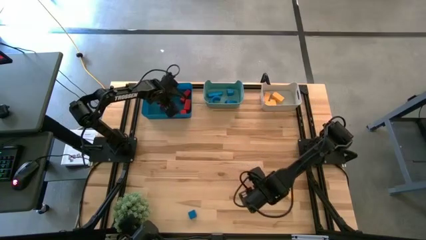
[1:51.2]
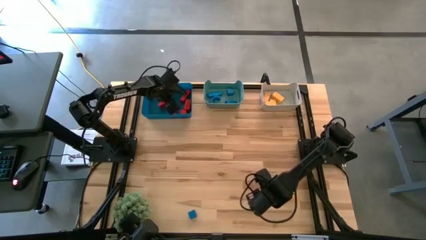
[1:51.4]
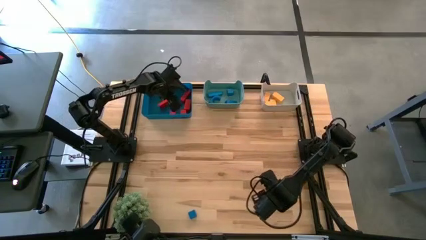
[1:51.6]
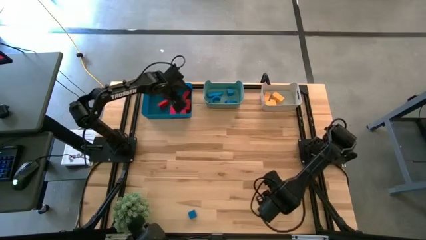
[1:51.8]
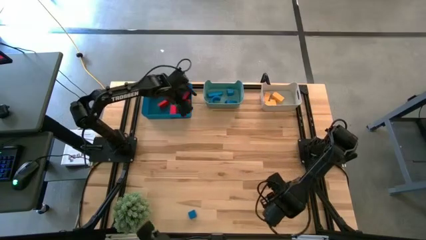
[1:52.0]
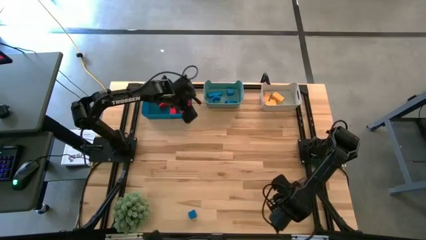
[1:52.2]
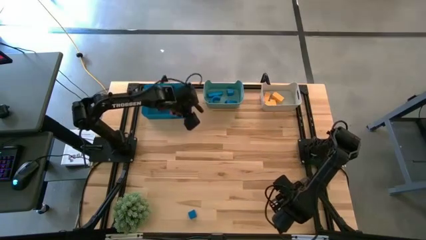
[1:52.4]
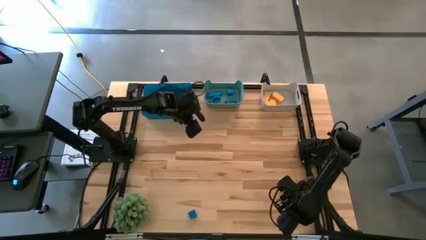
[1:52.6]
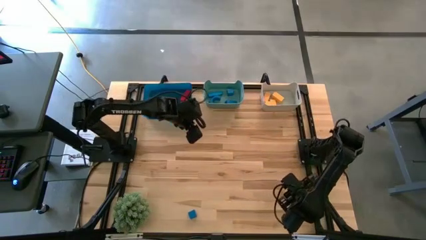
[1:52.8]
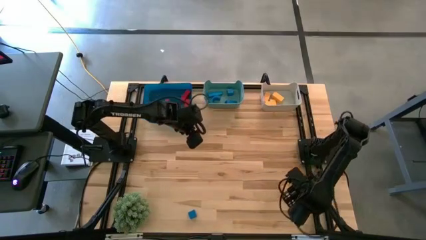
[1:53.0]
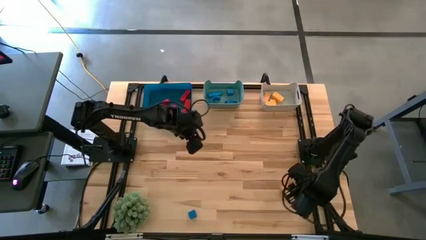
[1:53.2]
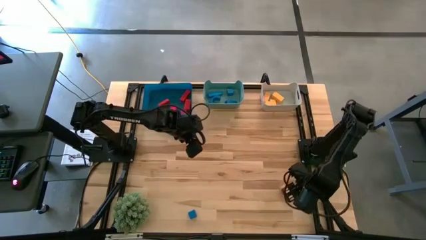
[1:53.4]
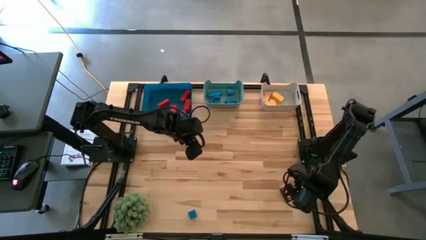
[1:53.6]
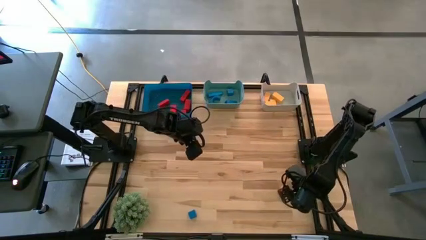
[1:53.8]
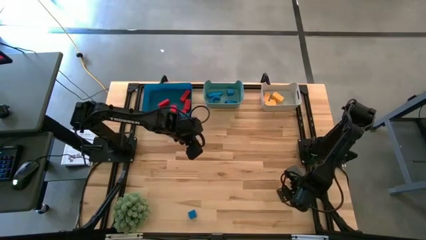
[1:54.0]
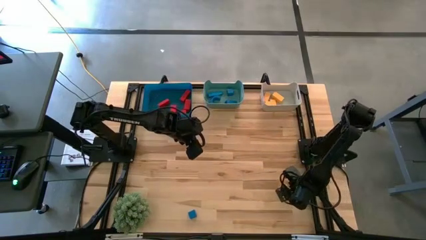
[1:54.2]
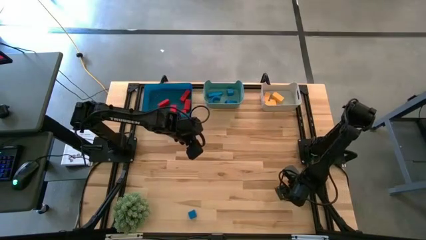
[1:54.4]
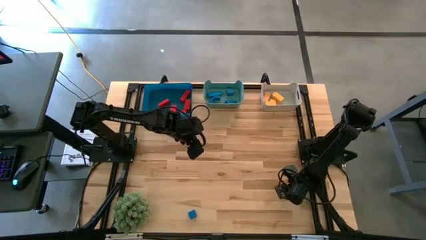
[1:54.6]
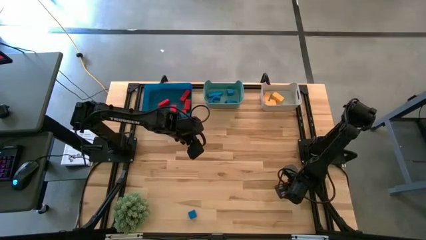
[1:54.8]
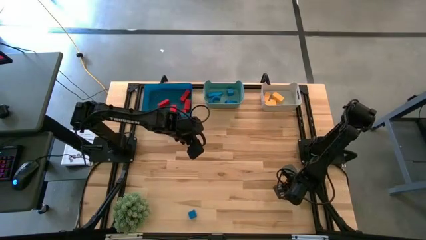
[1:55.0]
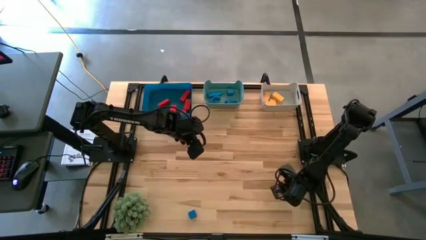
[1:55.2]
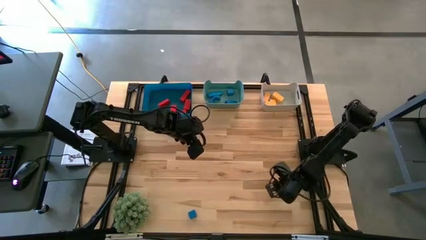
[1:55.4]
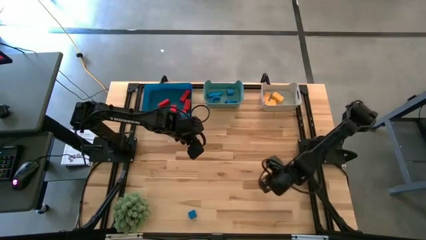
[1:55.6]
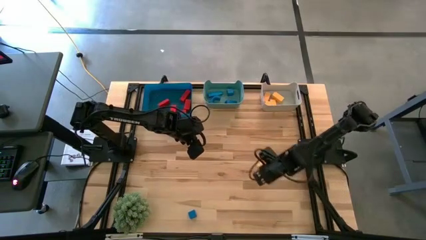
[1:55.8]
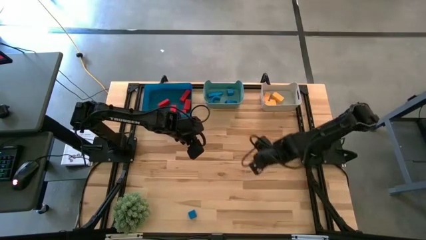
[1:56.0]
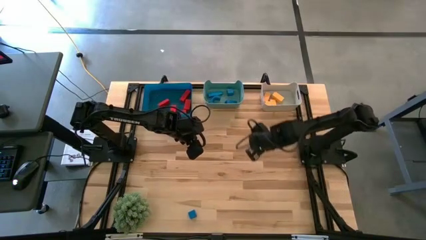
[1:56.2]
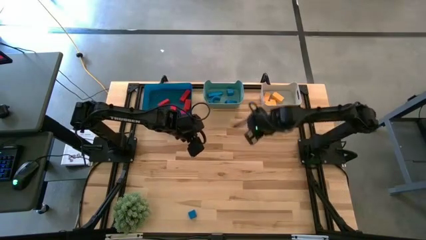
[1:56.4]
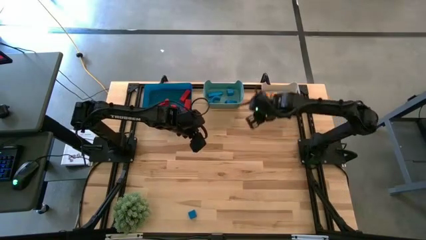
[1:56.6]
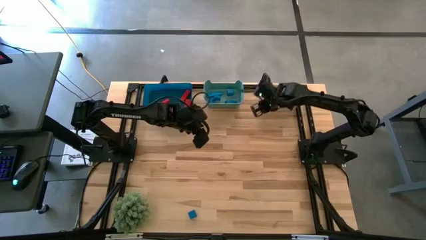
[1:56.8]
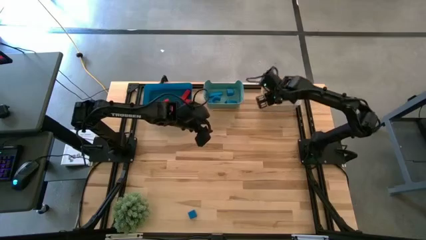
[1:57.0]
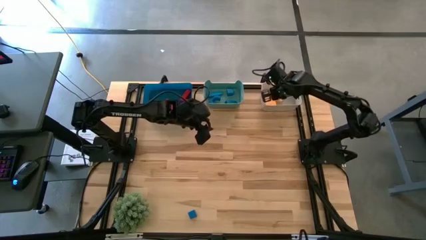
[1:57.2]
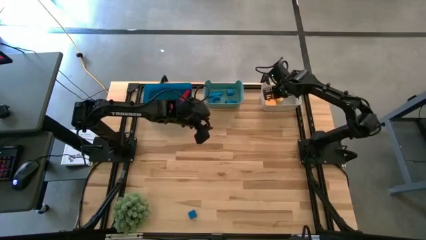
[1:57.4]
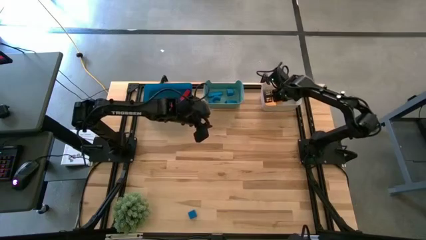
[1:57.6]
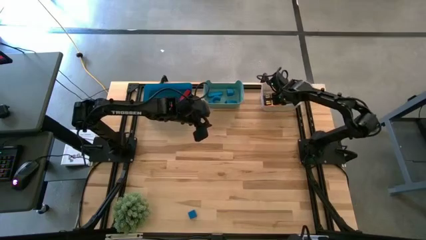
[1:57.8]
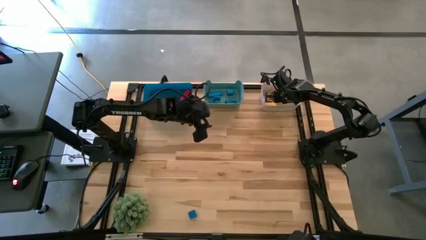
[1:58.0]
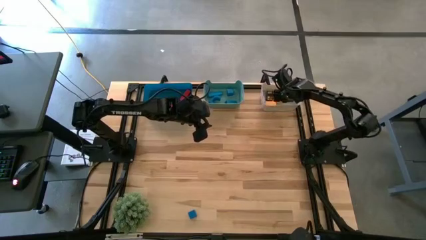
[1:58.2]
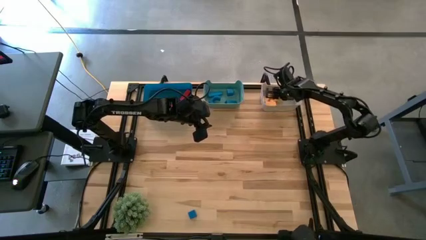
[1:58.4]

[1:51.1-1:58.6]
Task: Sort & place blocks by color
Put the yellow block into the gray bin

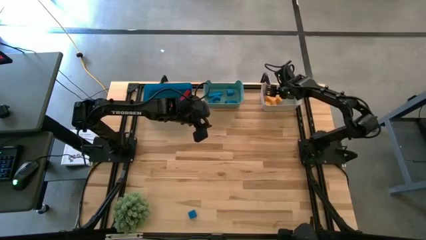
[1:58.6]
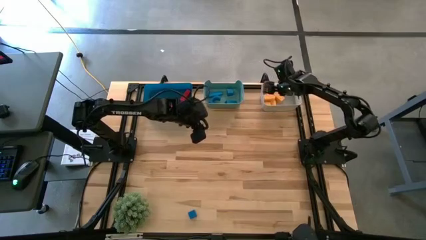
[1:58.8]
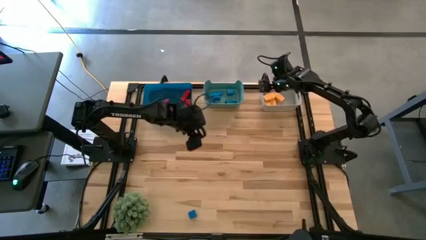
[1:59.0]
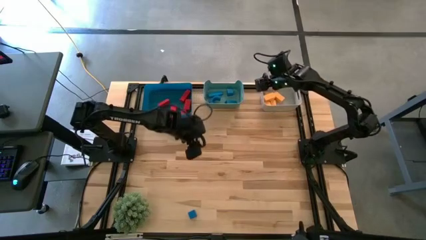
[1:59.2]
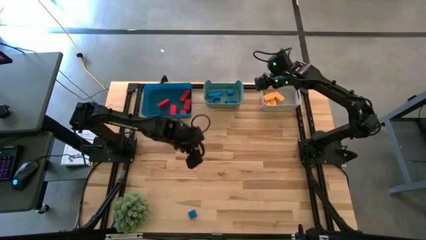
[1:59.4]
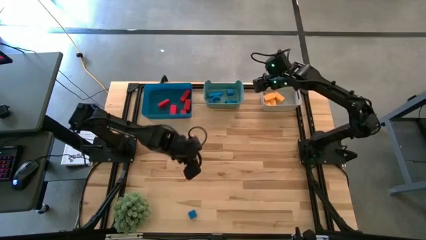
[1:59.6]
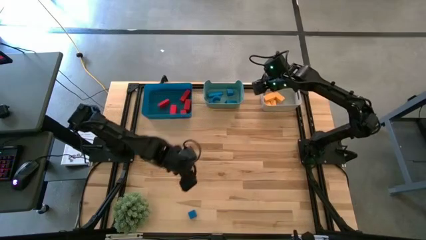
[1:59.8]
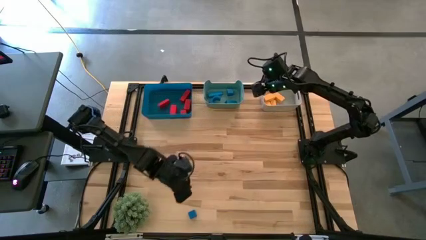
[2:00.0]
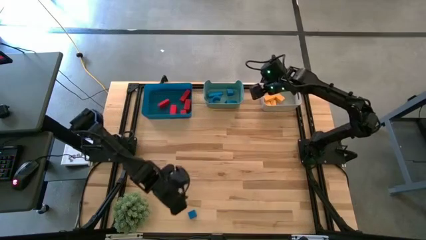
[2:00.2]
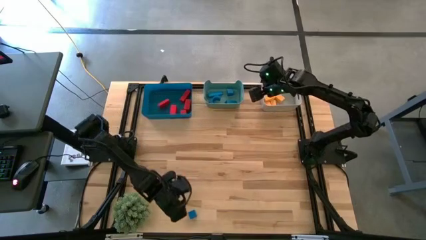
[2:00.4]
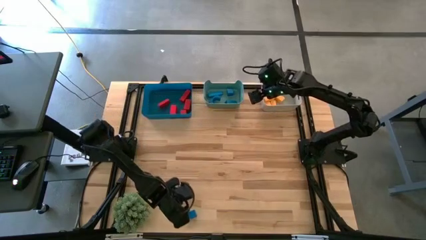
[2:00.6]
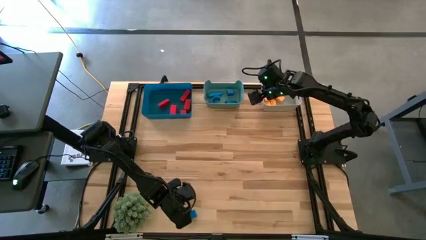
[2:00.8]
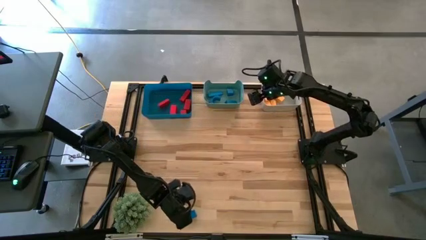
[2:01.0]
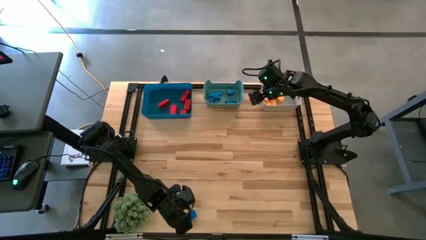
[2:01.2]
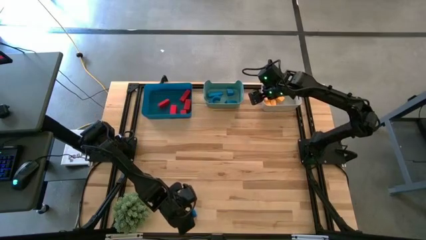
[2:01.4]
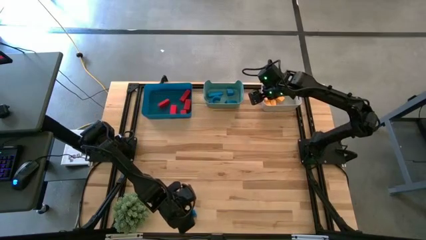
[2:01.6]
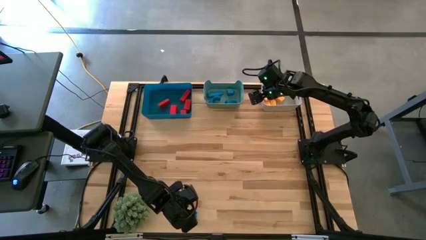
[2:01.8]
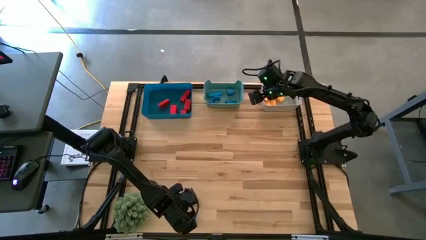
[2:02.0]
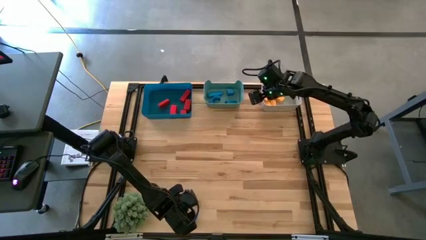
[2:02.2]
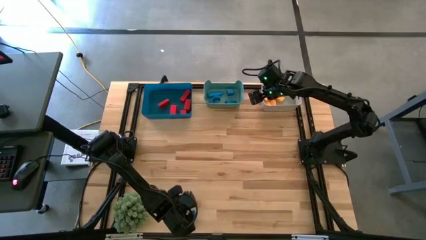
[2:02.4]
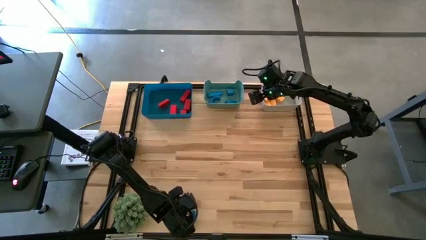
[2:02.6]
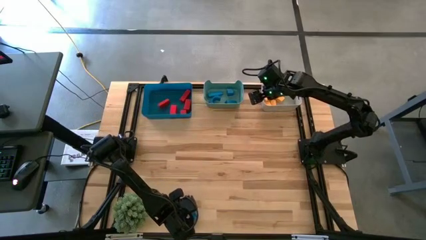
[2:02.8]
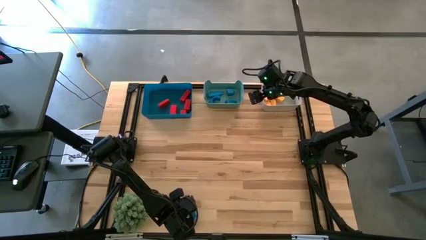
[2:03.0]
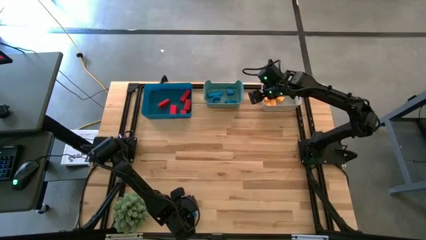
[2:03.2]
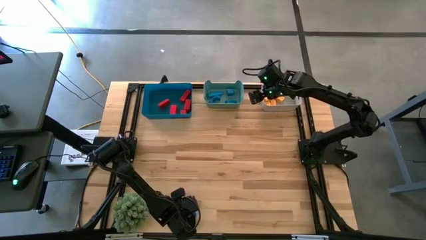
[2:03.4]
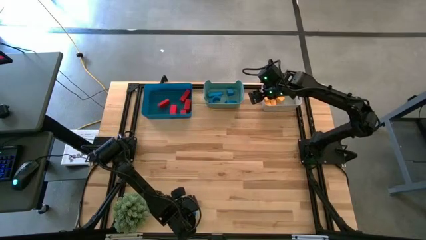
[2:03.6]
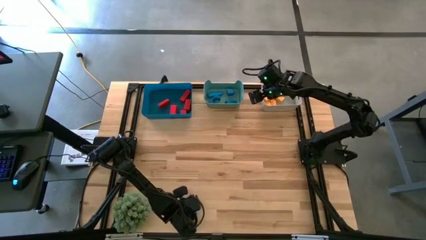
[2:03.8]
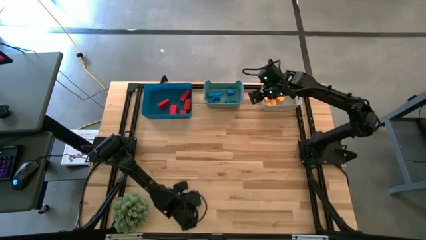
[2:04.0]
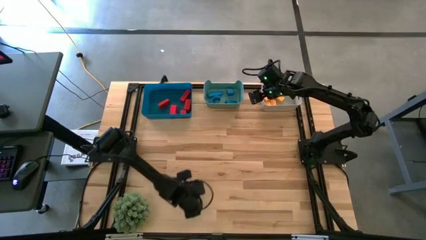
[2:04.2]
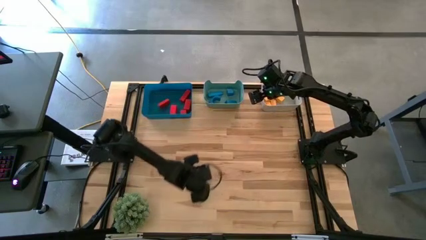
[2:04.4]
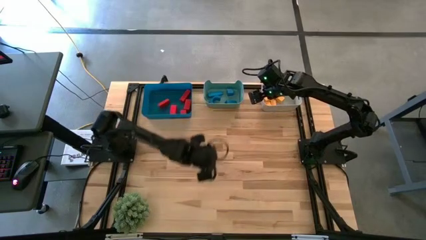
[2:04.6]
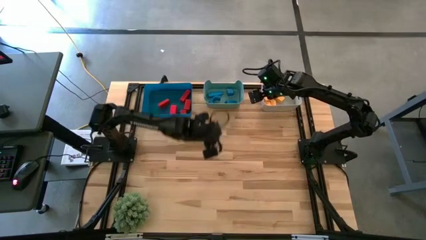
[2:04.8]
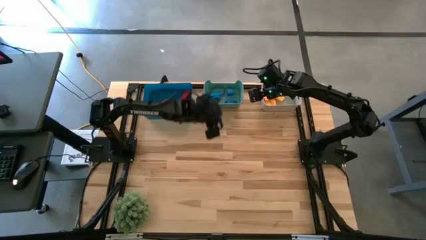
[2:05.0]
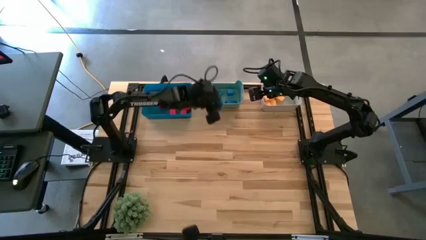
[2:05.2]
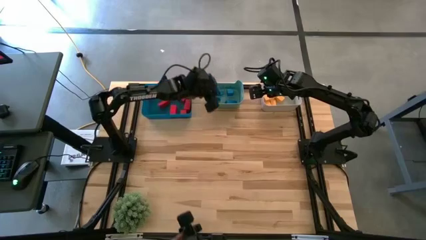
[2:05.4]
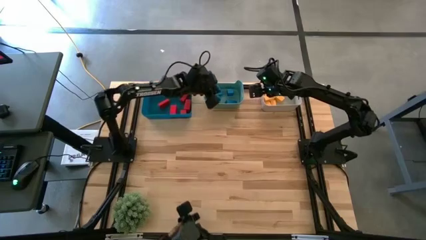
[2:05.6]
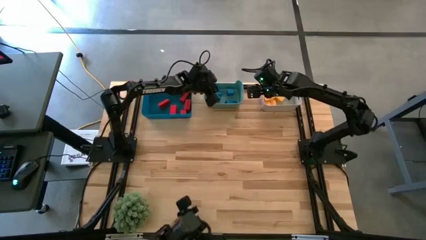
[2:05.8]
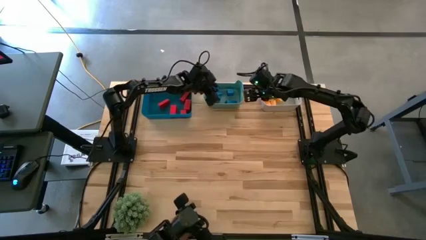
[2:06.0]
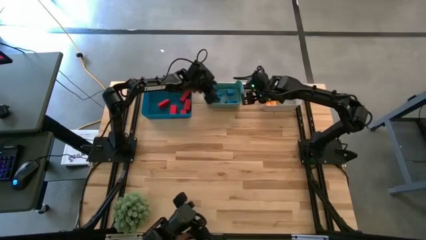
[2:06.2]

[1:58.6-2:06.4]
Put the blue block into the green bin
